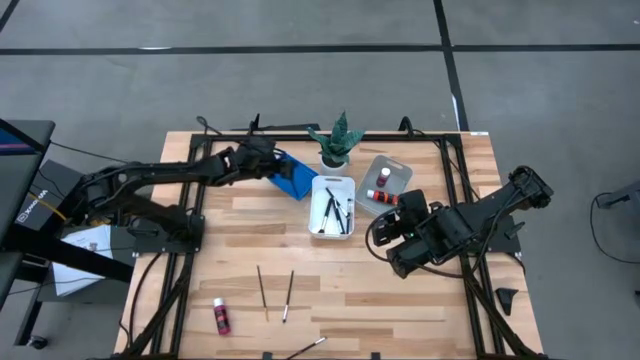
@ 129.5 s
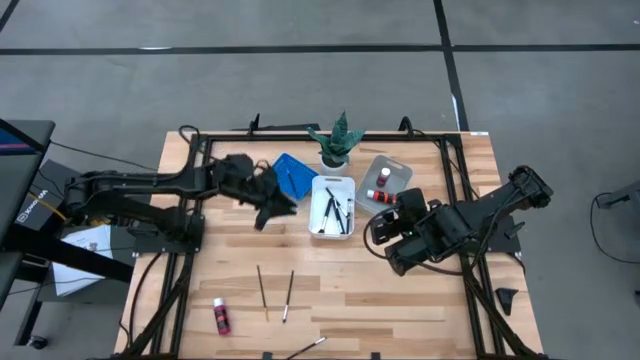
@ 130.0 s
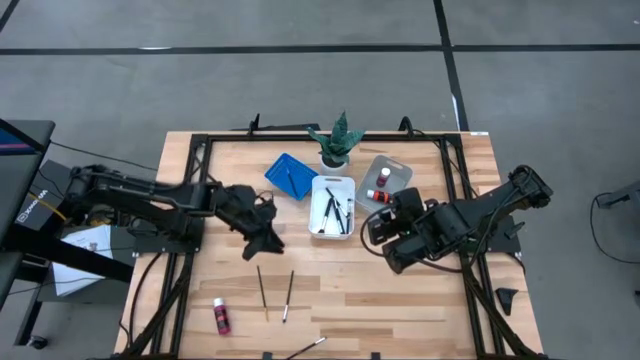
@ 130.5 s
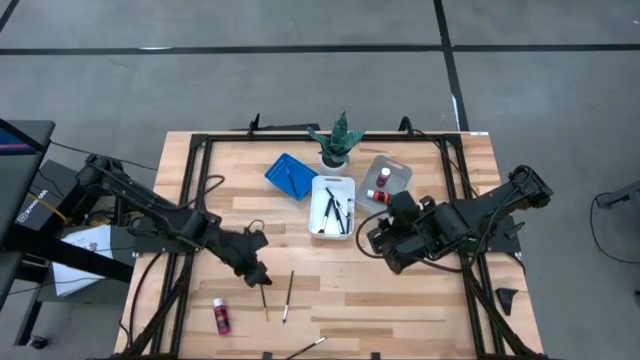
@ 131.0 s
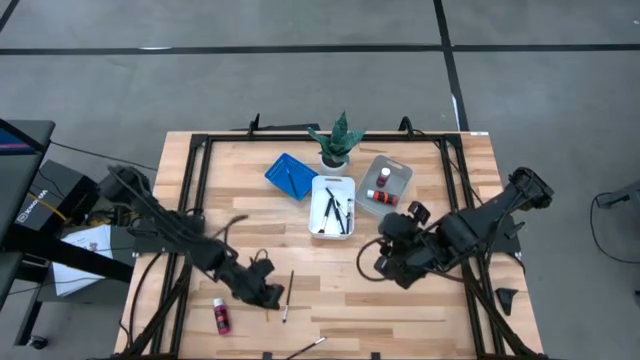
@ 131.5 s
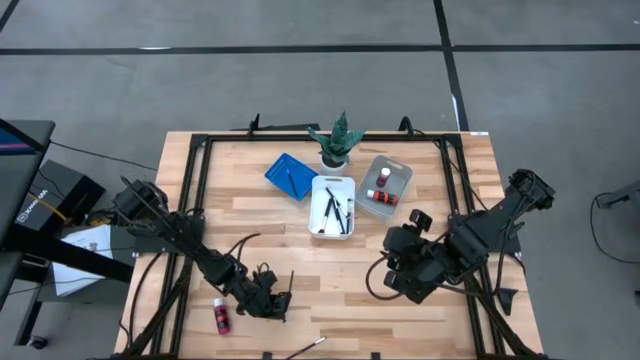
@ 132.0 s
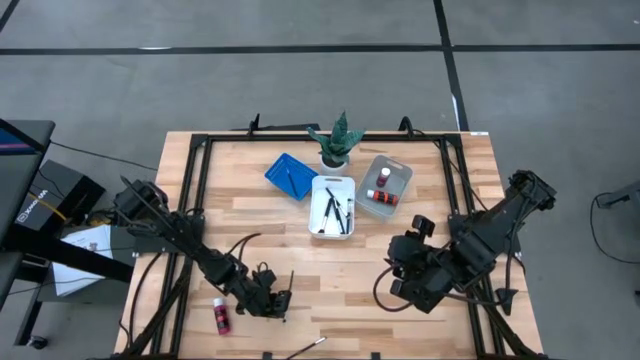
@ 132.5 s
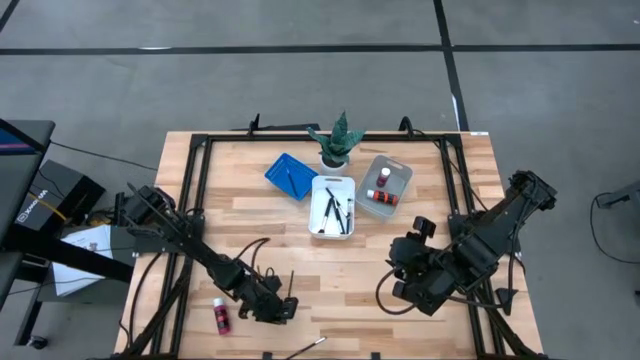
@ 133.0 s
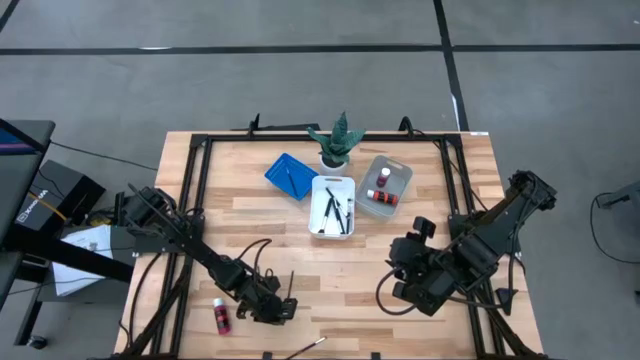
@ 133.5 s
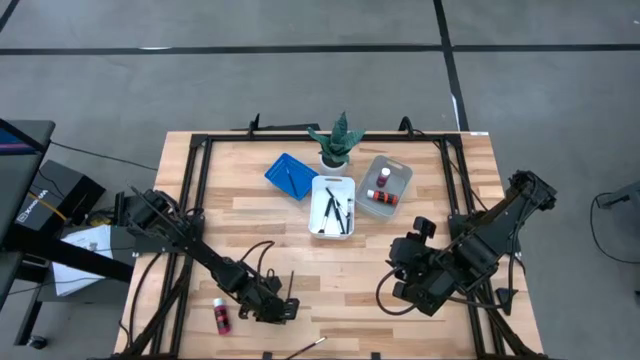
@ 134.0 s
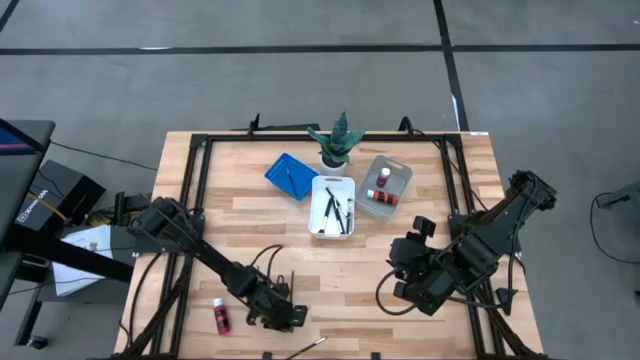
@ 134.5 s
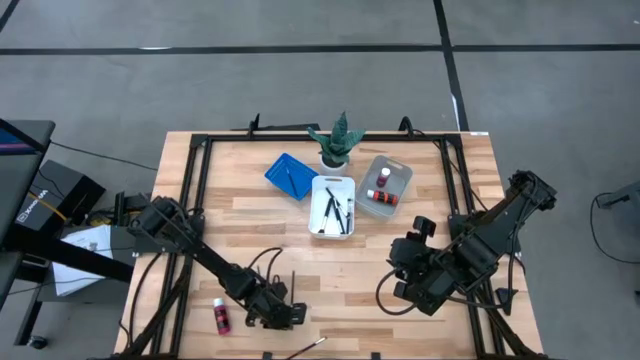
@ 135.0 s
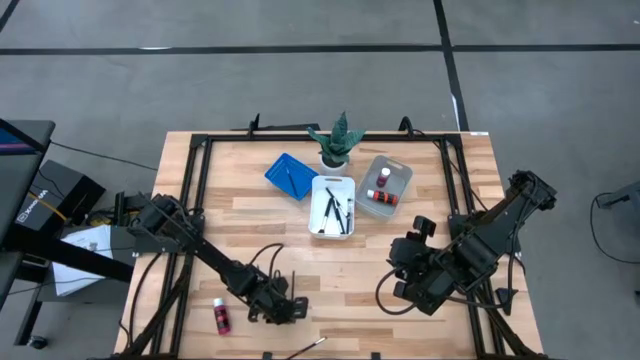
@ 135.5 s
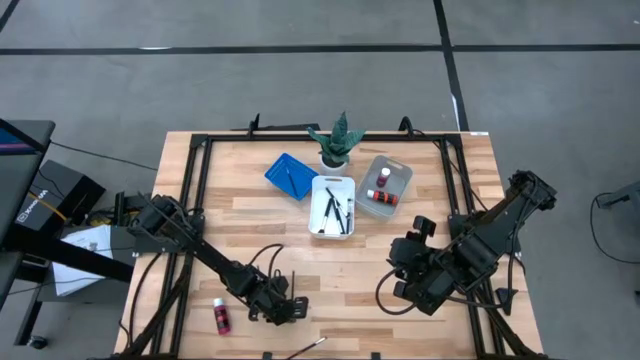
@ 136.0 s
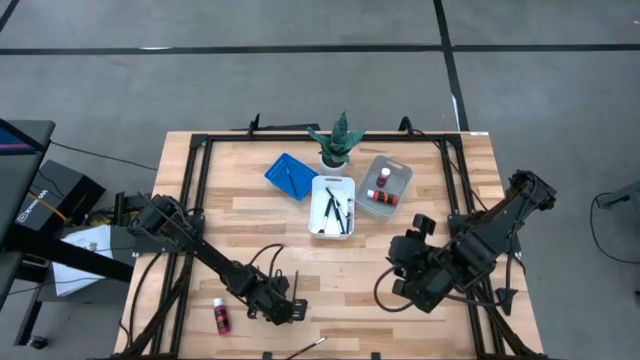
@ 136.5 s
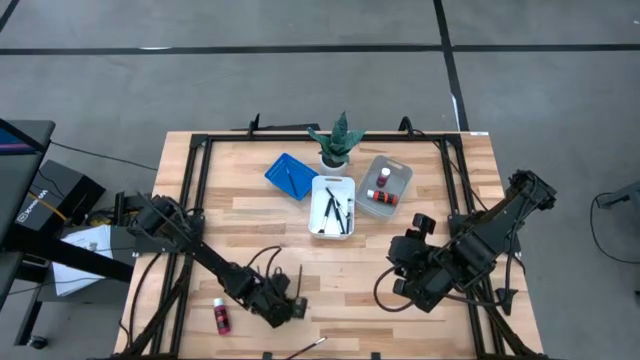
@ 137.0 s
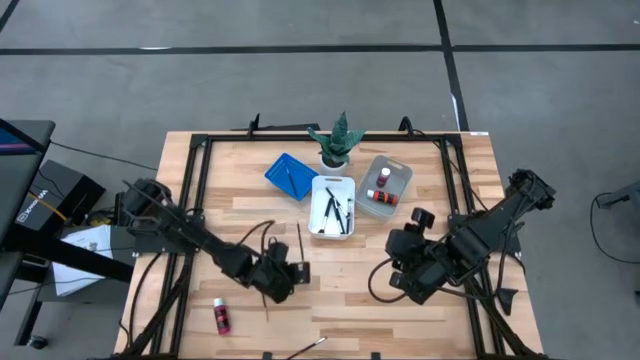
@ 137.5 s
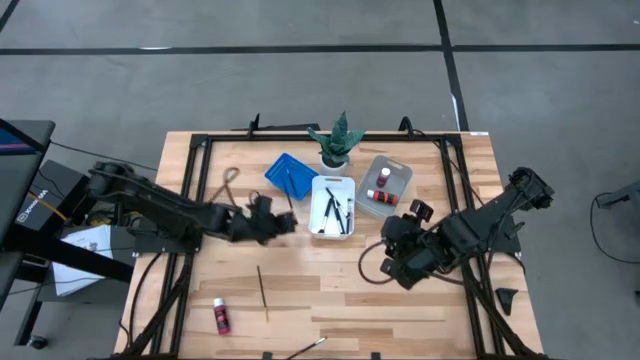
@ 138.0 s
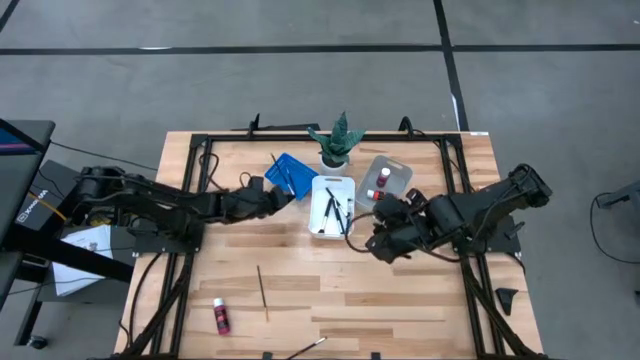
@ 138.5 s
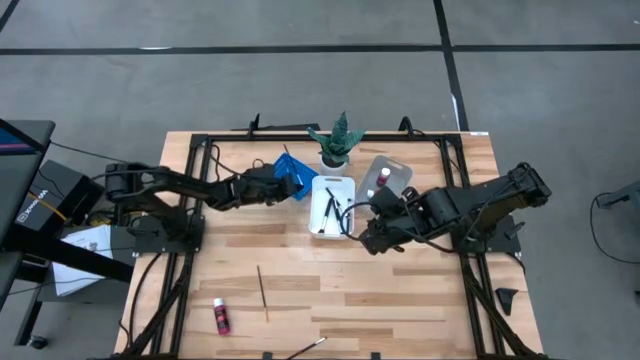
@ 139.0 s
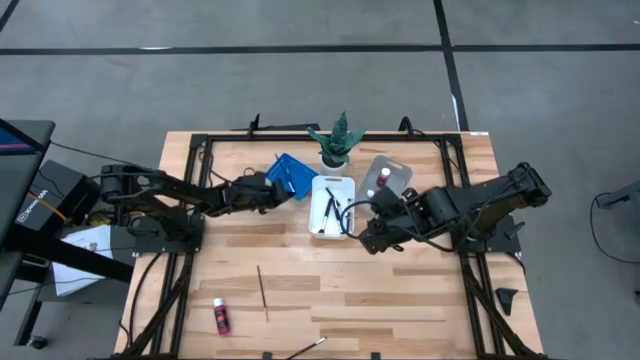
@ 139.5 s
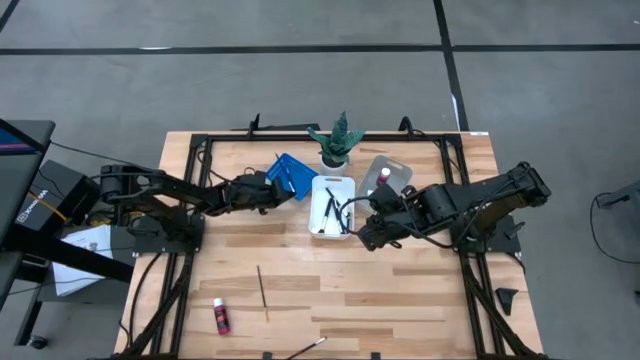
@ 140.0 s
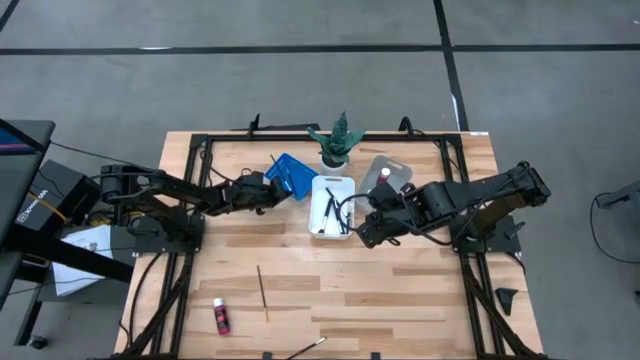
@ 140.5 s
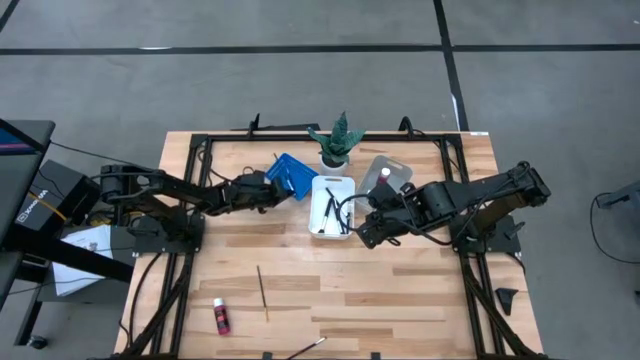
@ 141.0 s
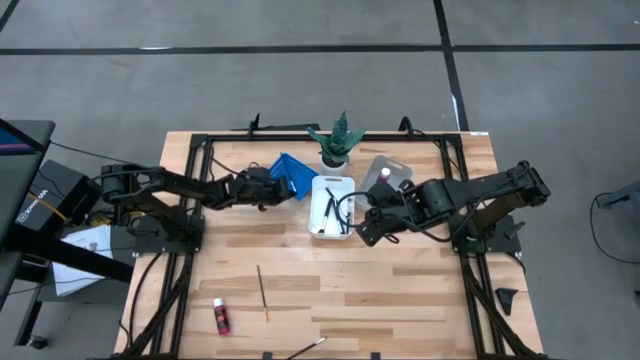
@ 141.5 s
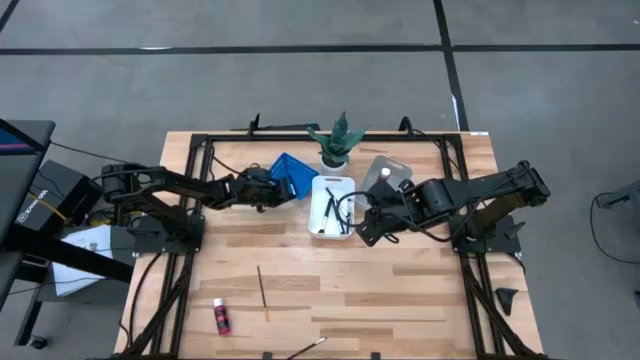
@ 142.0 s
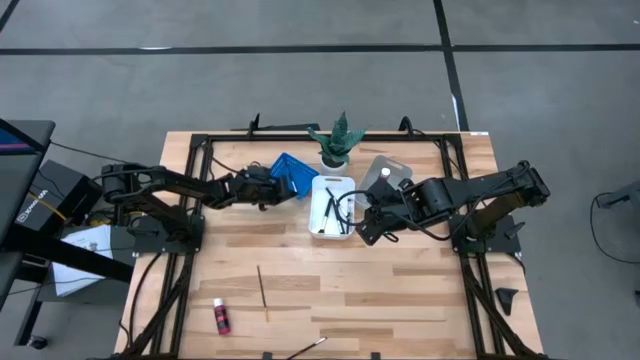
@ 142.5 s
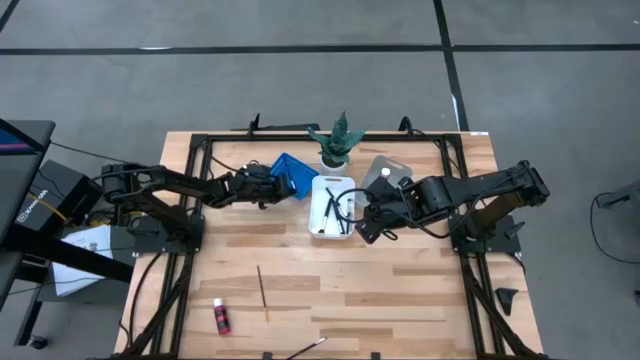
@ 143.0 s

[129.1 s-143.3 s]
Task: Pick & Place Paint Supplies
Put the small black paint brush into the blue bin

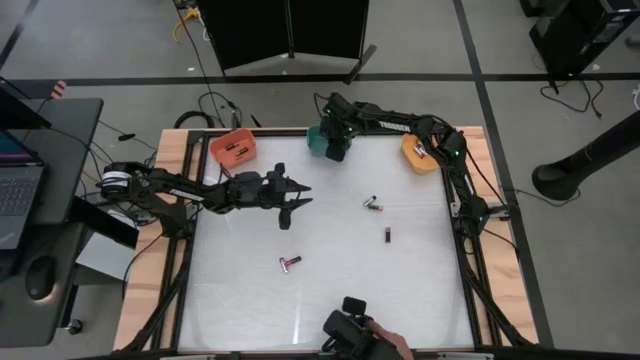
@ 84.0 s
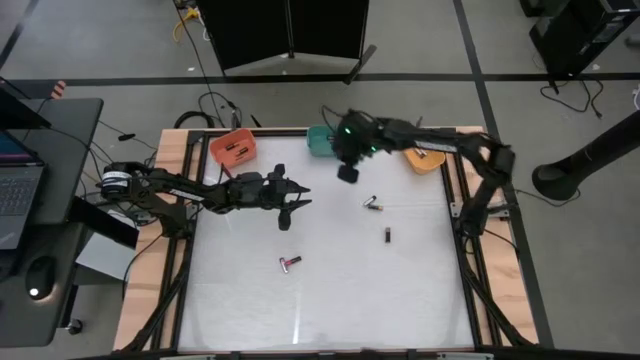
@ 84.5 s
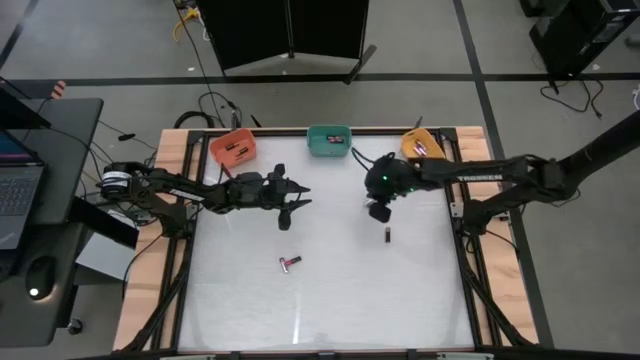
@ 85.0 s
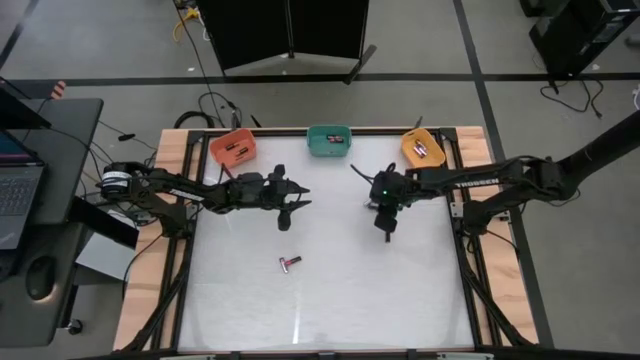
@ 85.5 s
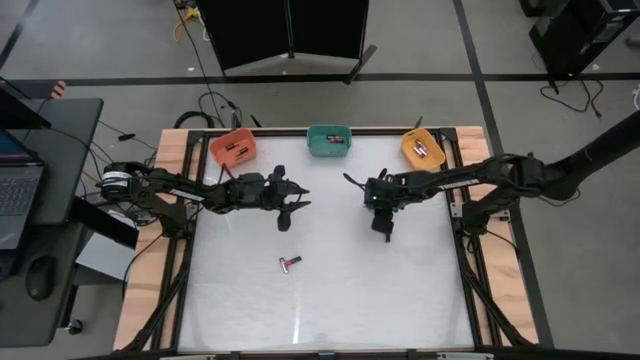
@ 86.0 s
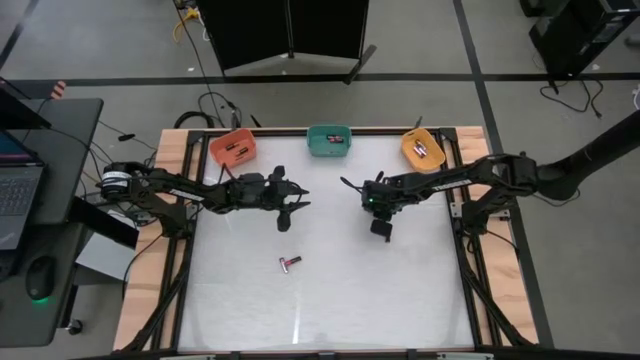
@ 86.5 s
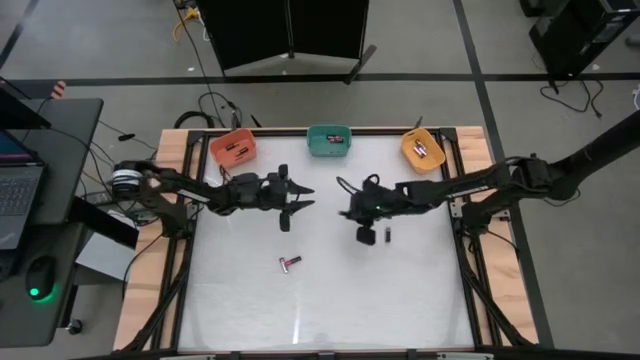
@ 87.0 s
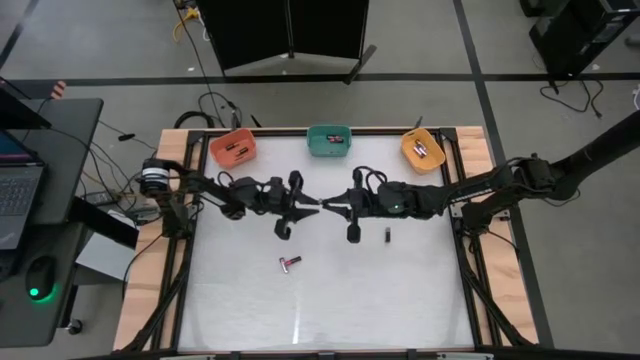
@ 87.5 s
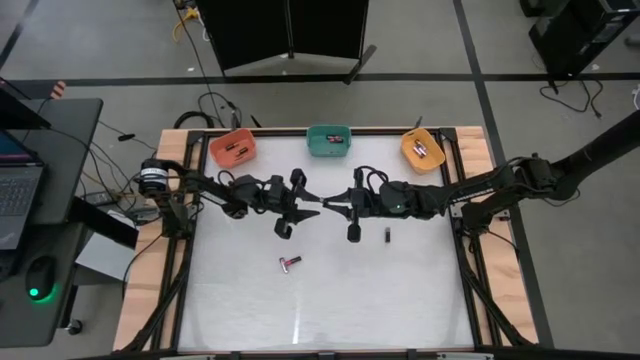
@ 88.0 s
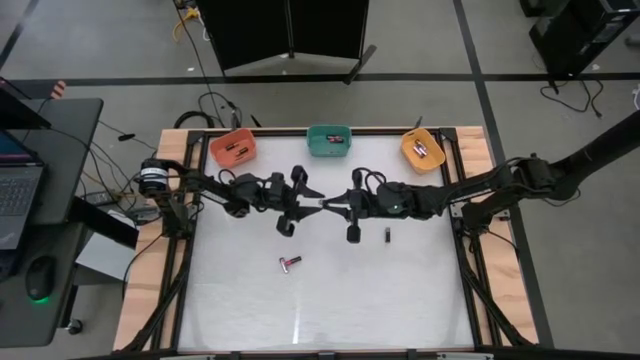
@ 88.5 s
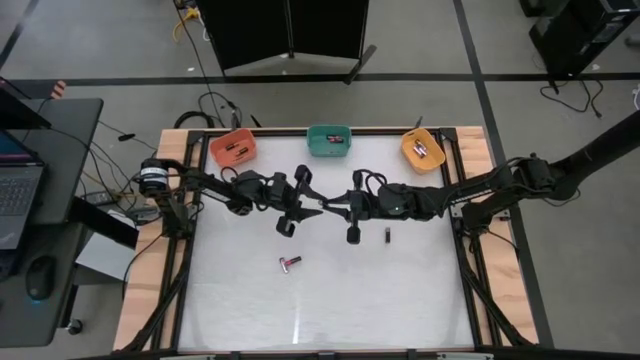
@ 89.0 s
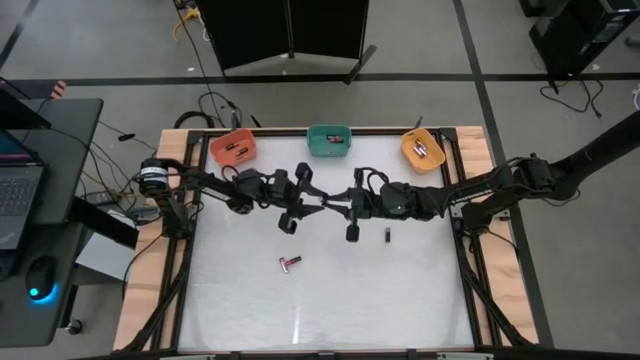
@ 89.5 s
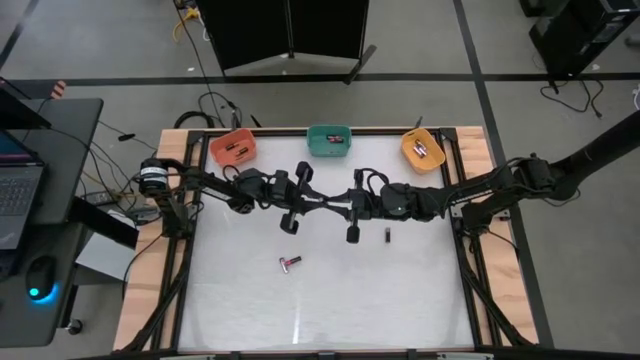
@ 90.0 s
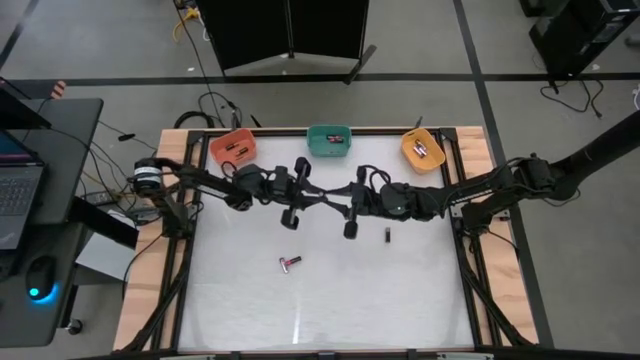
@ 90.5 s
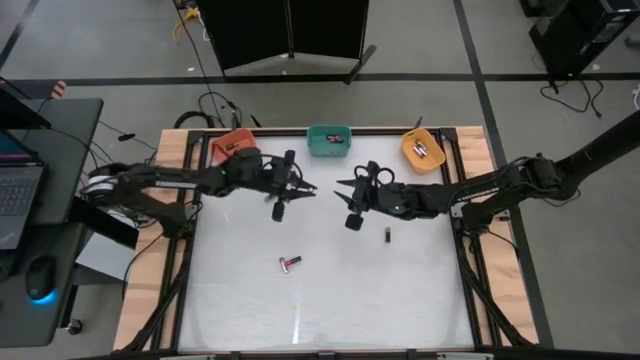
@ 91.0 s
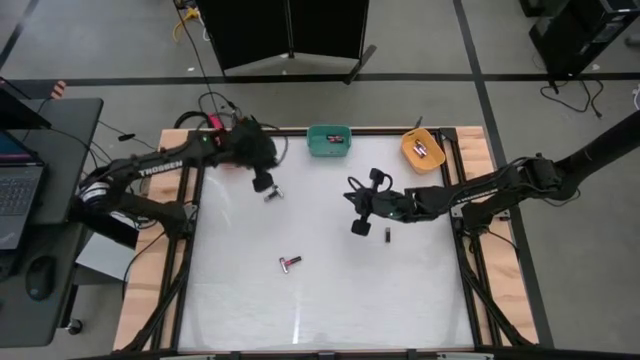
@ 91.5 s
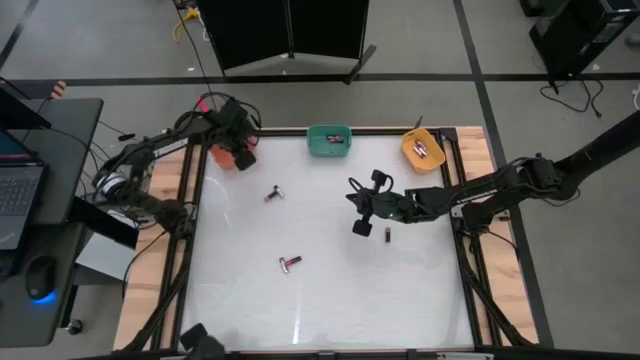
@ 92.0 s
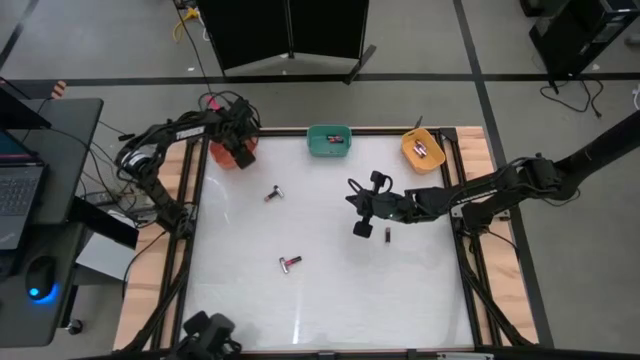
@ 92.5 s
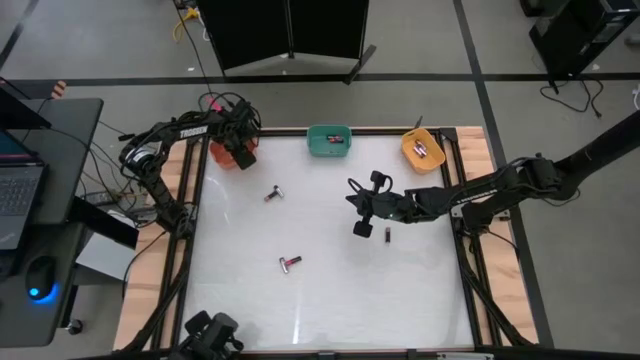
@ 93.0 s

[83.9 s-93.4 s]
Task: Sort batteries
Put the brown battery into the orange bin
